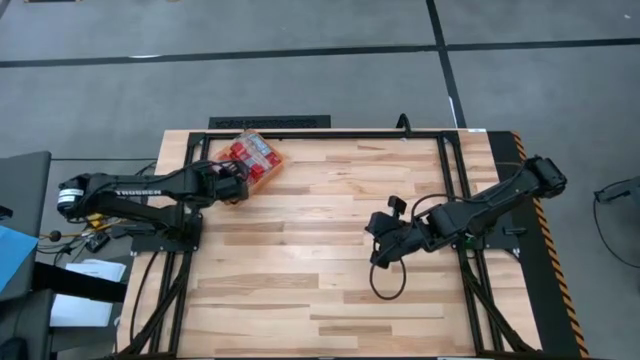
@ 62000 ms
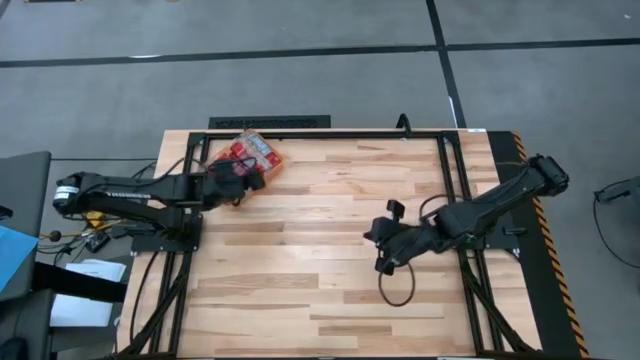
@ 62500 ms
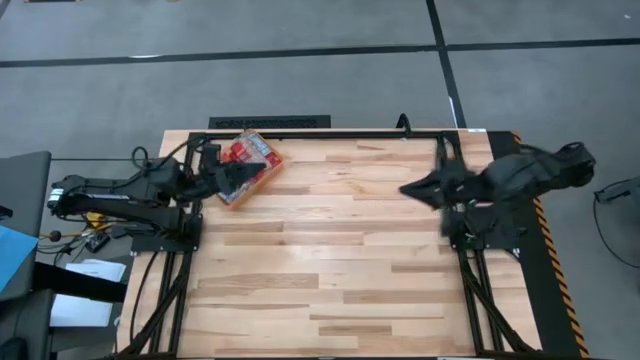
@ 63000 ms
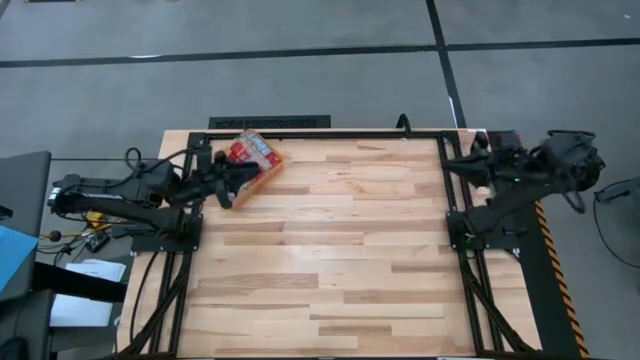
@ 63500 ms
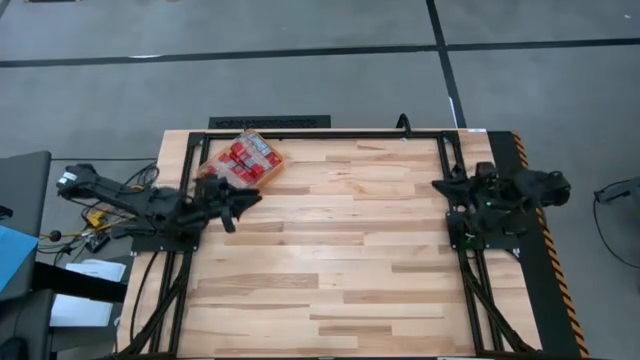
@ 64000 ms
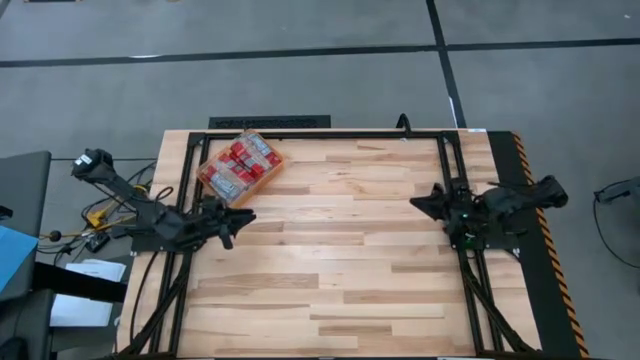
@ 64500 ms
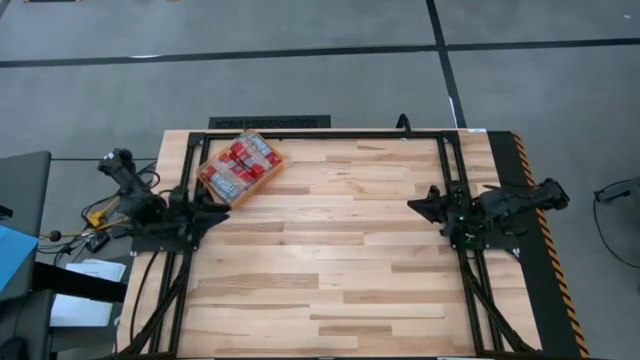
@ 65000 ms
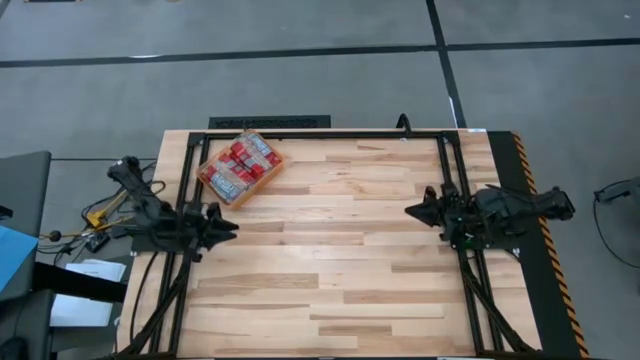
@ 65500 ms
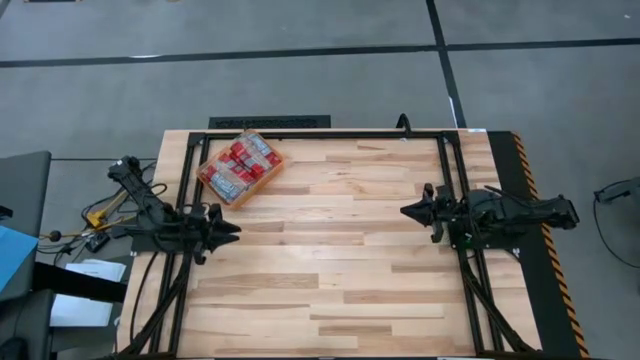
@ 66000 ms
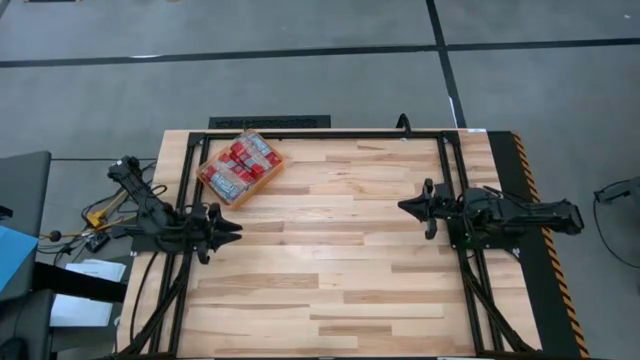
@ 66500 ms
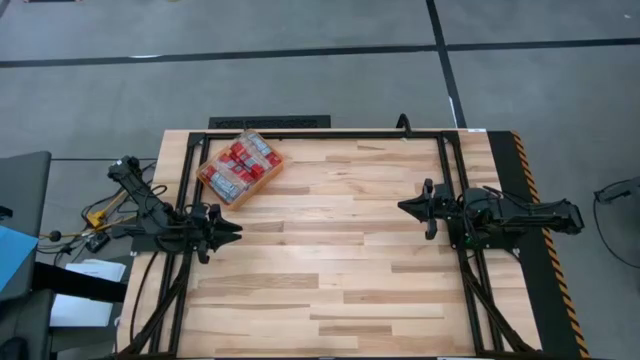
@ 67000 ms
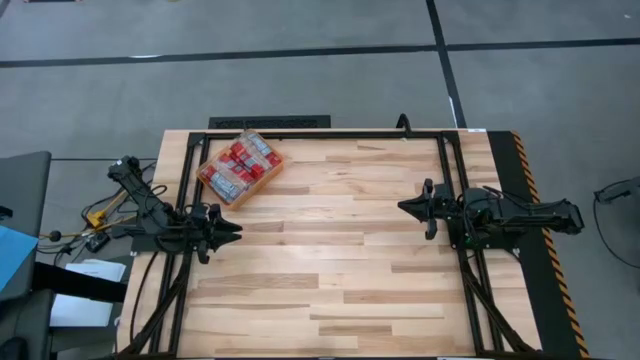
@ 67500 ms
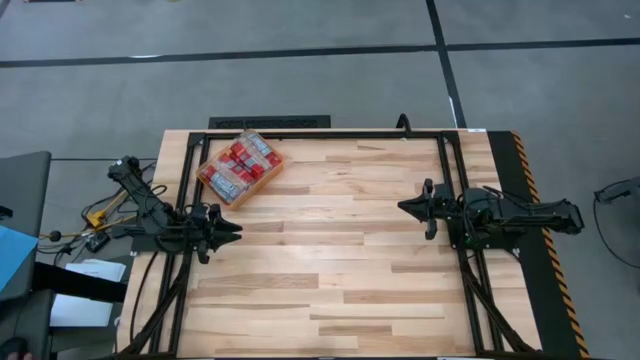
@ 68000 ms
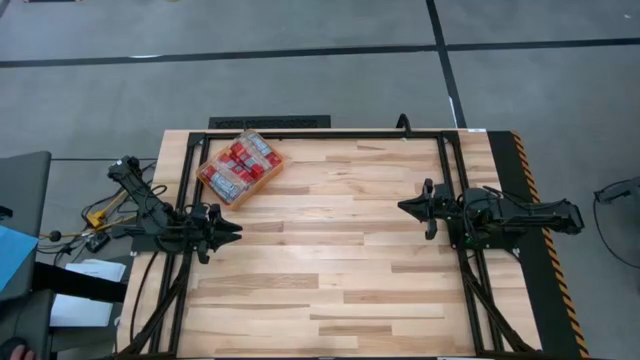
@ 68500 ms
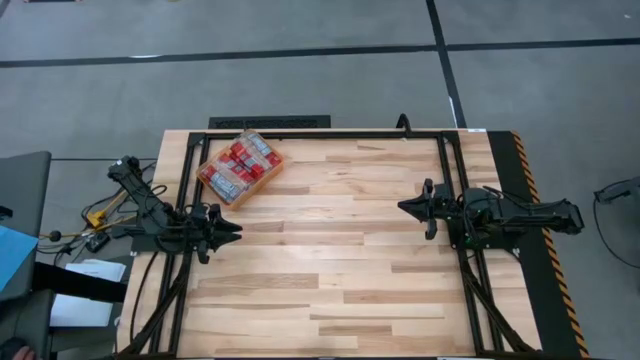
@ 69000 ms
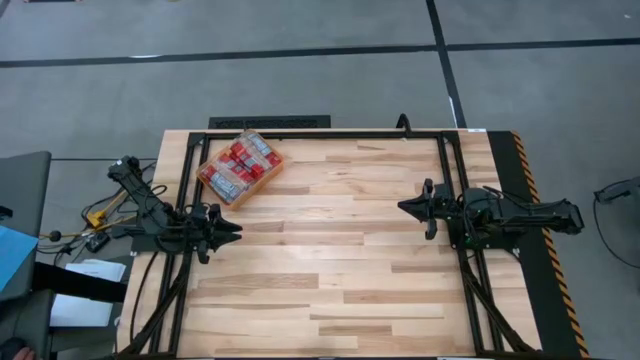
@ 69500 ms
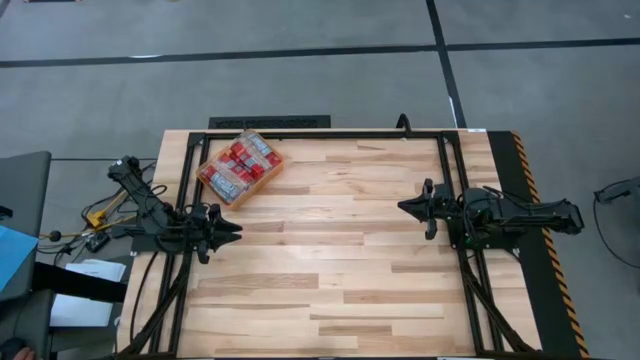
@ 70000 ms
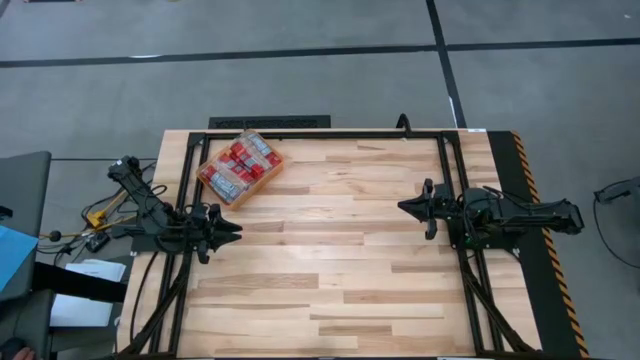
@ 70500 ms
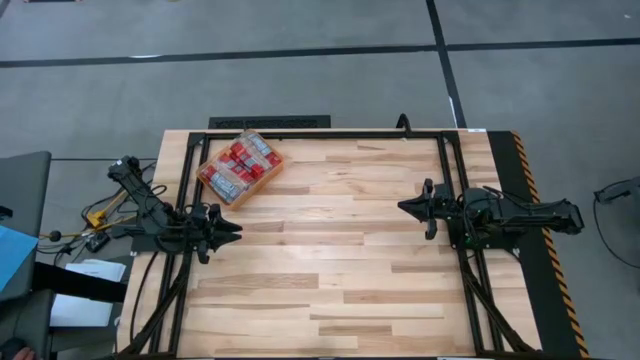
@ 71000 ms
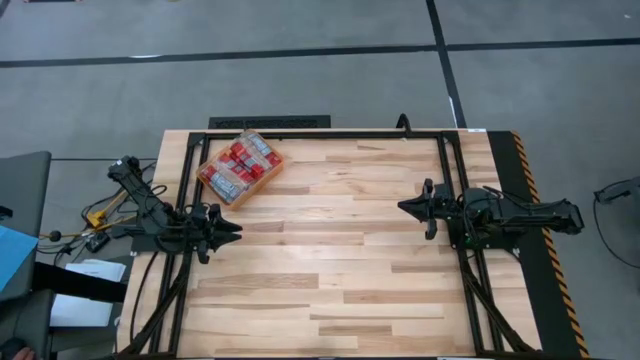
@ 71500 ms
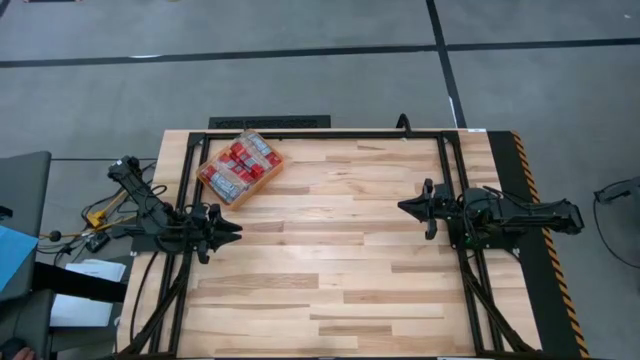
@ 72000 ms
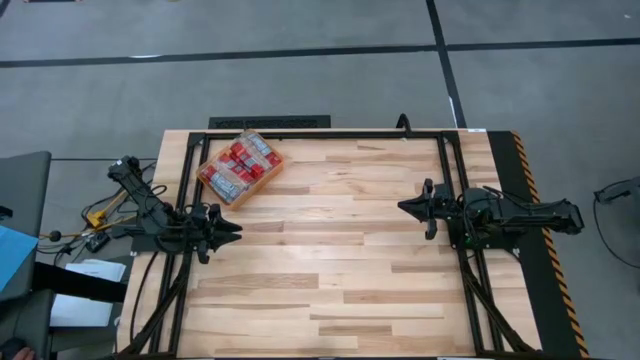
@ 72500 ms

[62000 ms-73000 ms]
Task: Sort popcorn bags into baskets
Return to Home Position

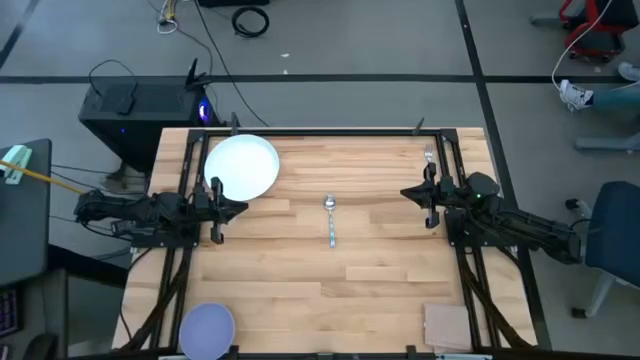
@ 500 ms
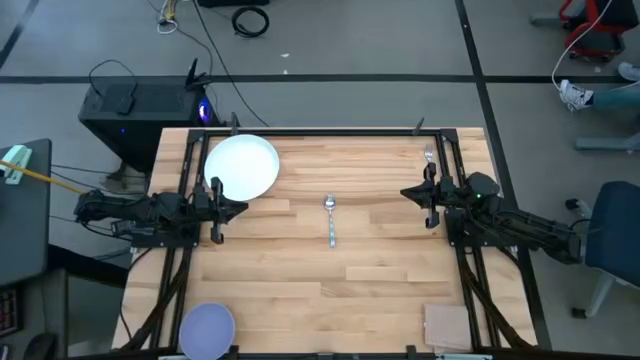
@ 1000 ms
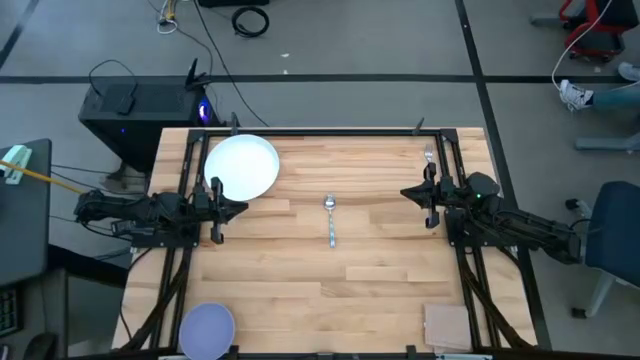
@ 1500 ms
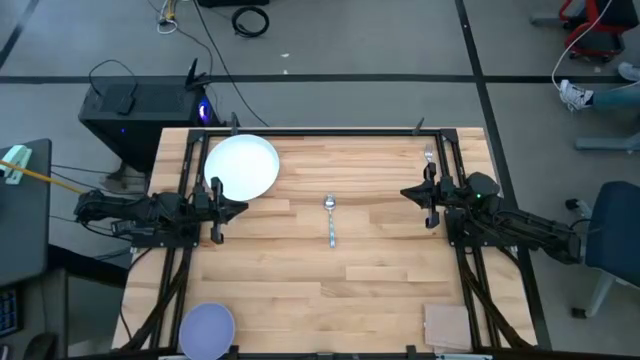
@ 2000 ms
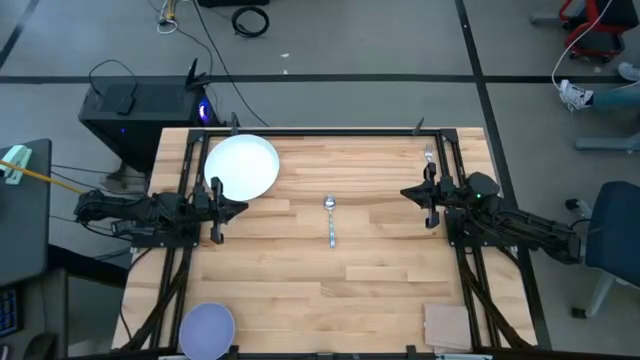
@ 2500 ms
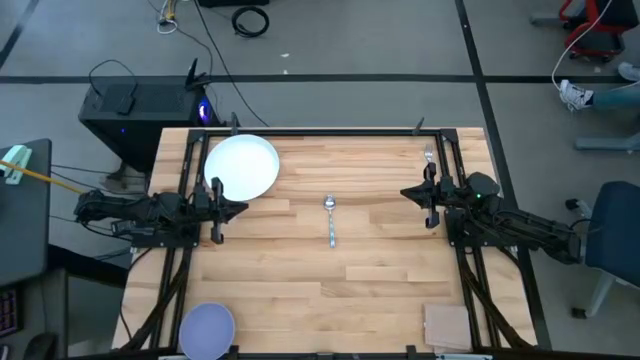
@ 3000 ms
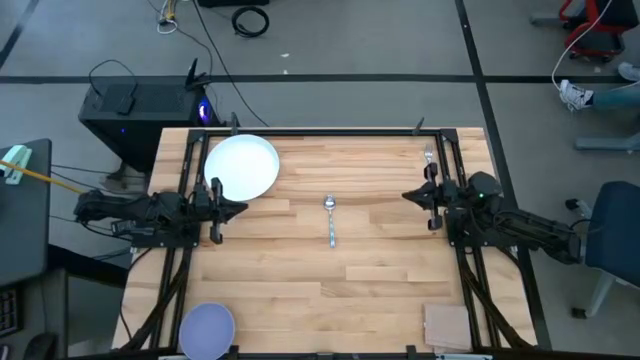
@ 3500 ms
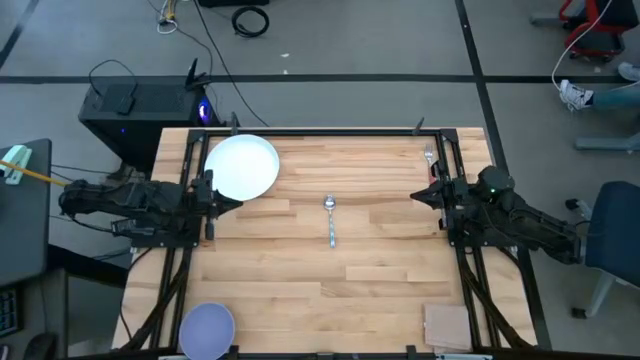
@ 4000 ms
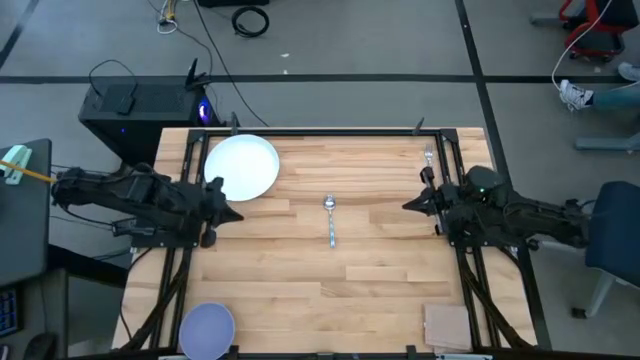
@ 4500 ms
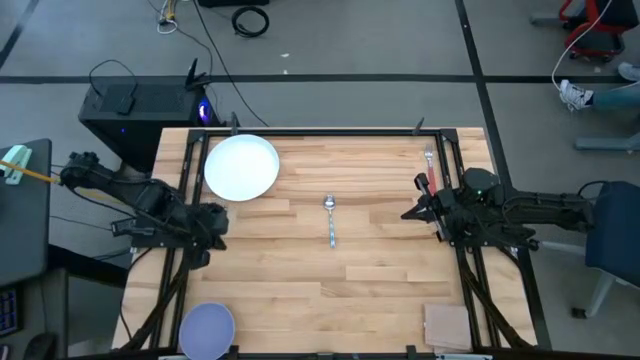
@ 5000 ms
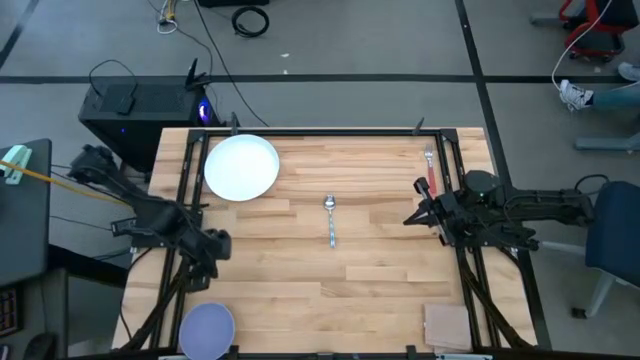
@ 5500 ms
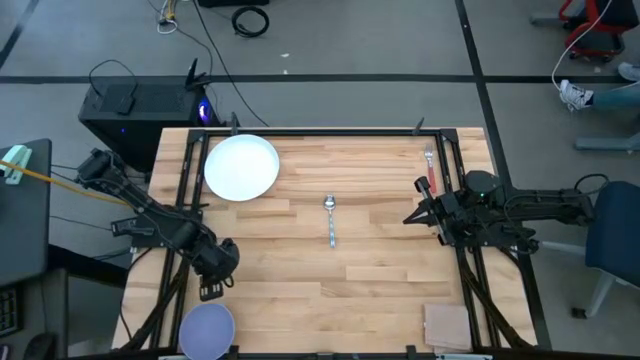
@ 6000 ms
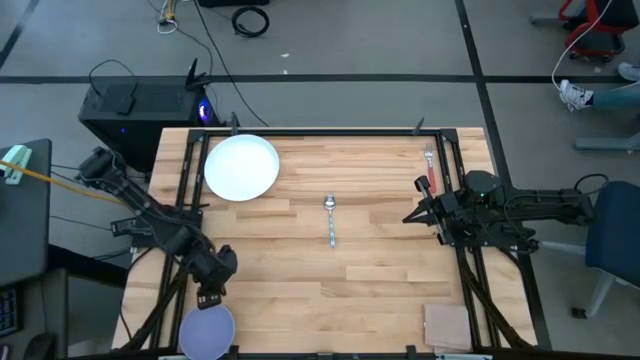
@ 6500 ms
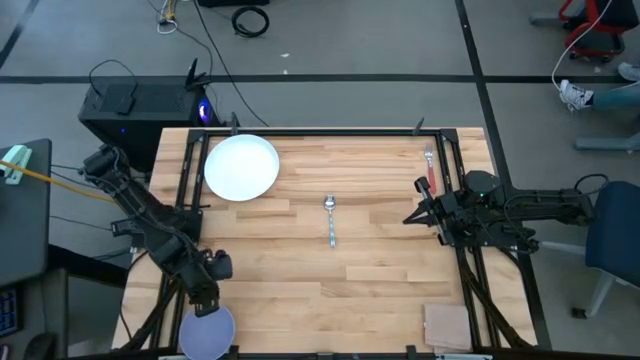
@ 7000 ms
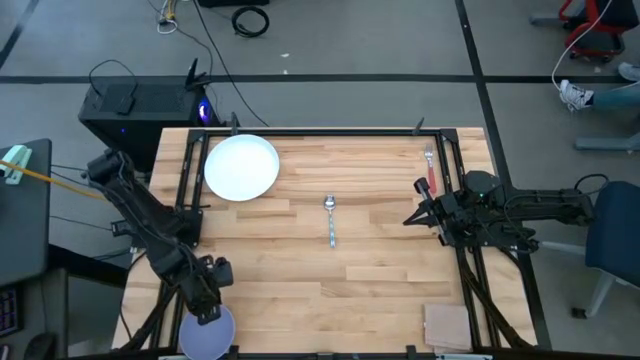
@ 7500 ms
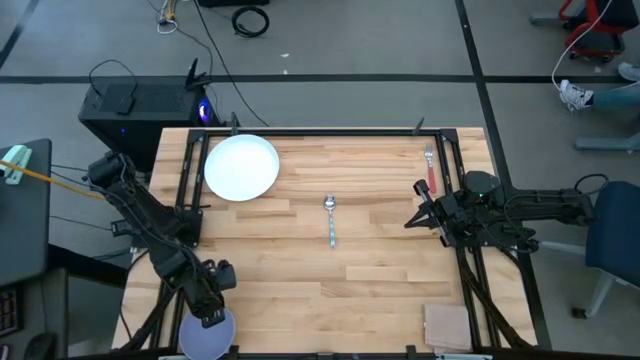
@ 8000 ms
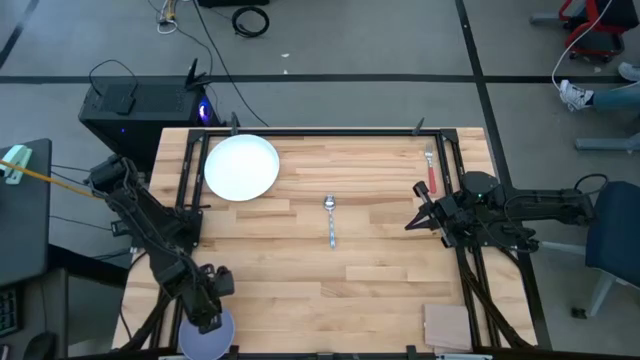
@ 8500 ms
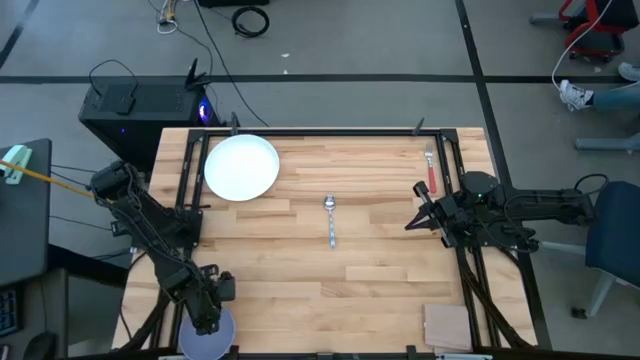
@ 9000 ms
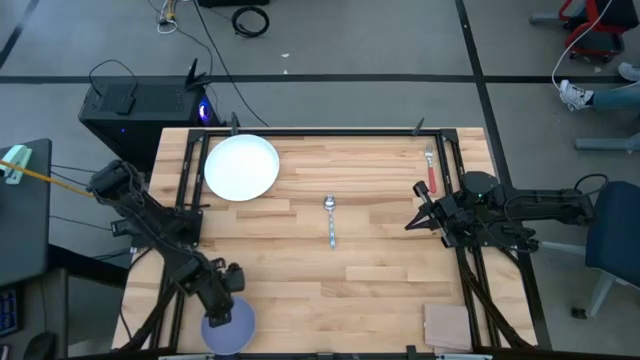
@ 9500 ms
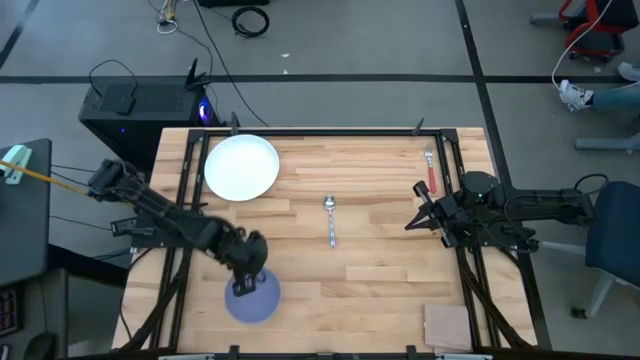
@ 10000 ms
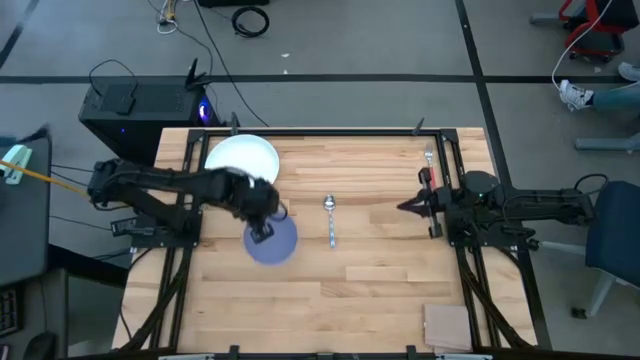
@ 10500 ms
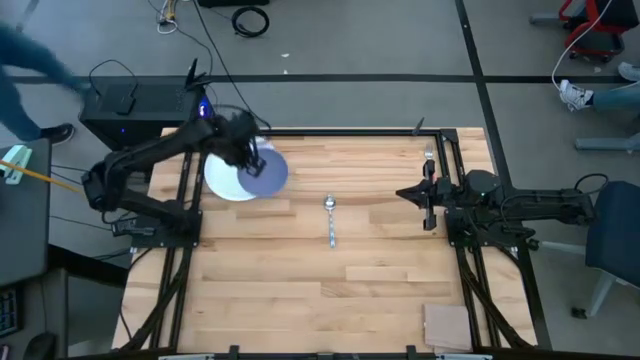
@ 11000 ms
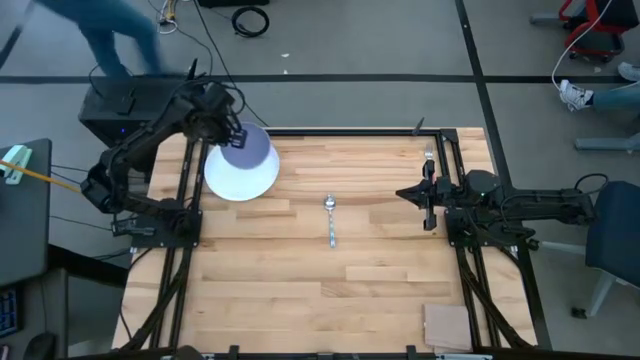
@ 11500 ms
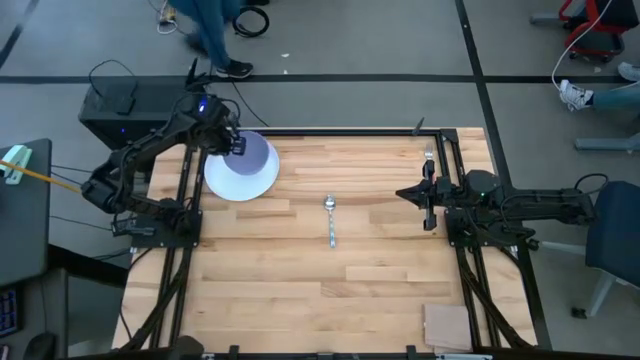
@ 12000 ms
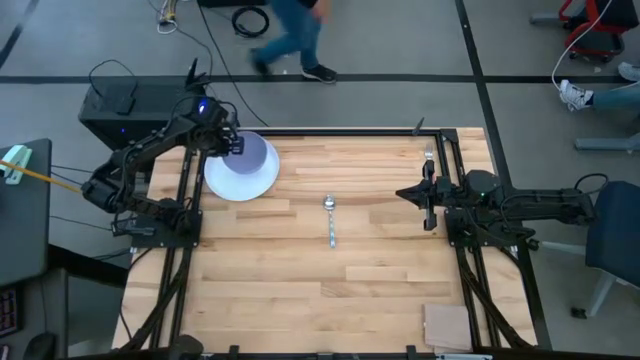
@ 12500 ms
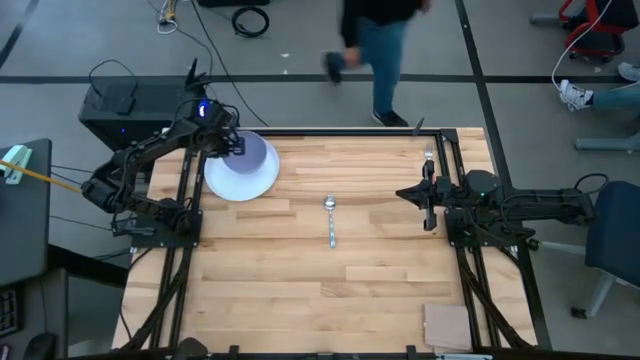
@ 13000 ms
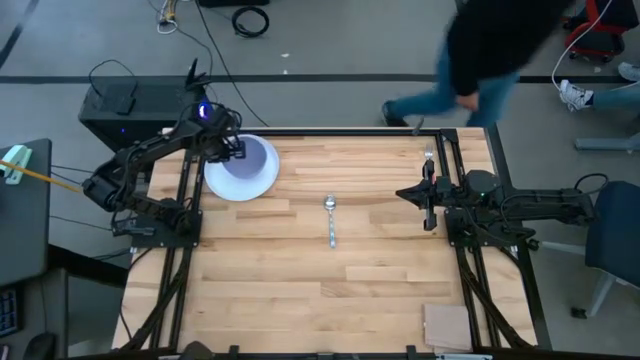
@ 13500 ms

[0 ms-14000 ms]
Task: Set table place
Stack the purple bowl on the white plate
